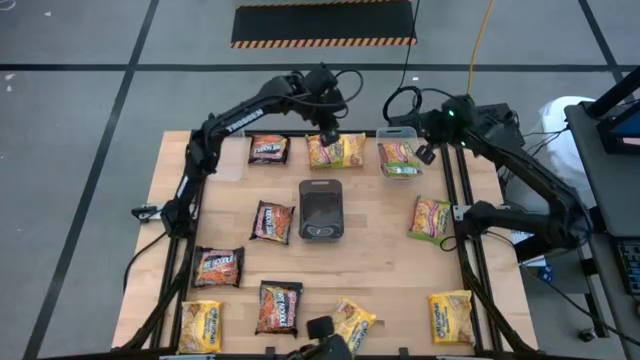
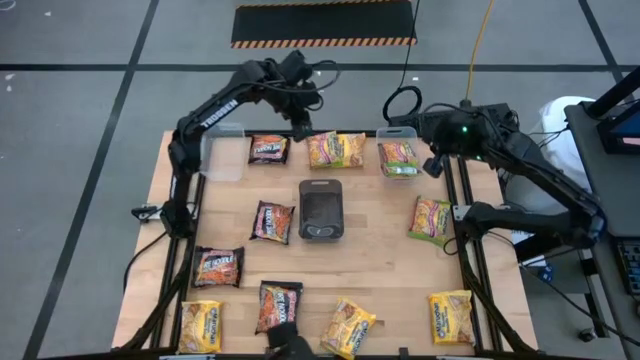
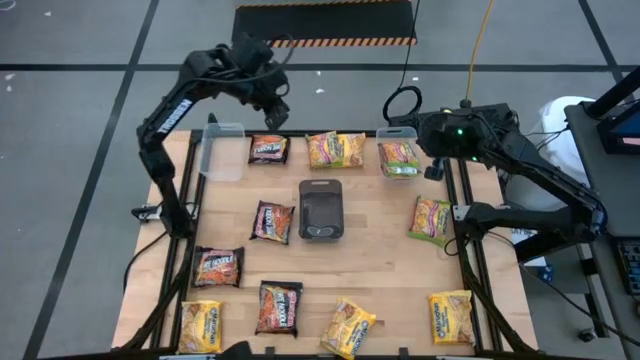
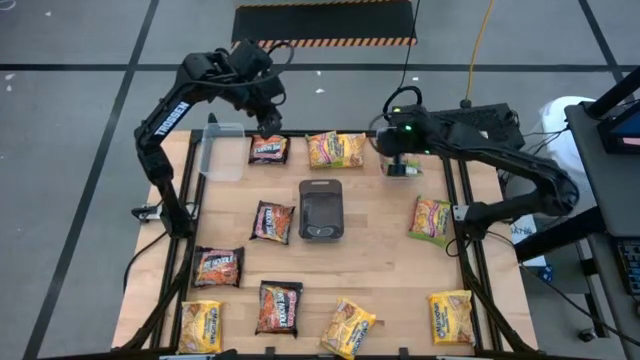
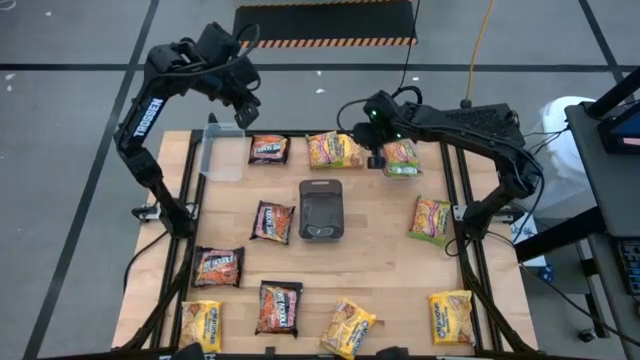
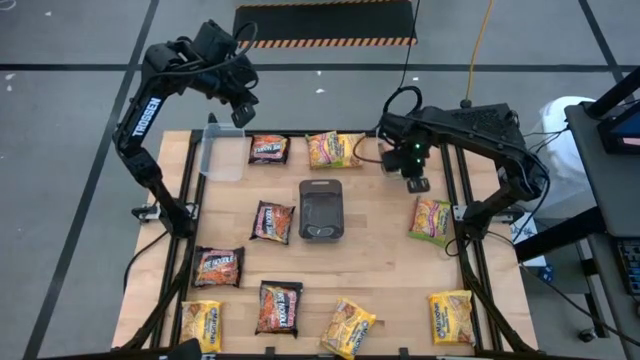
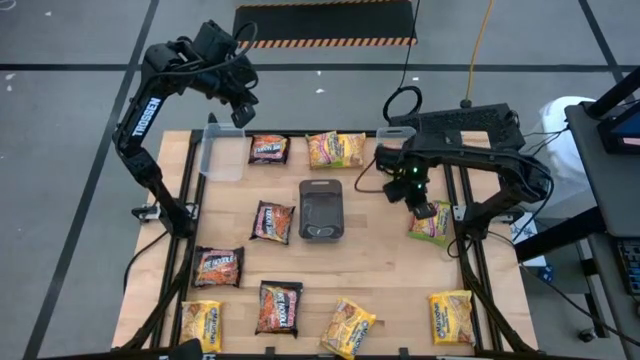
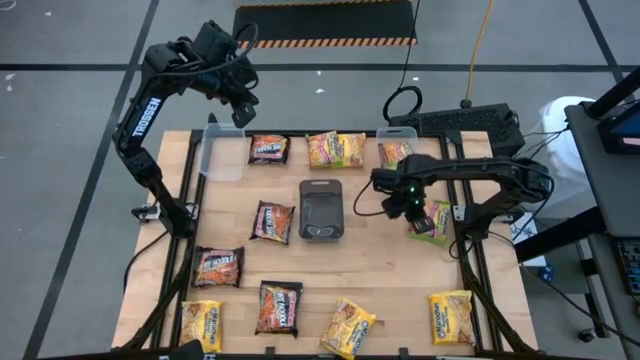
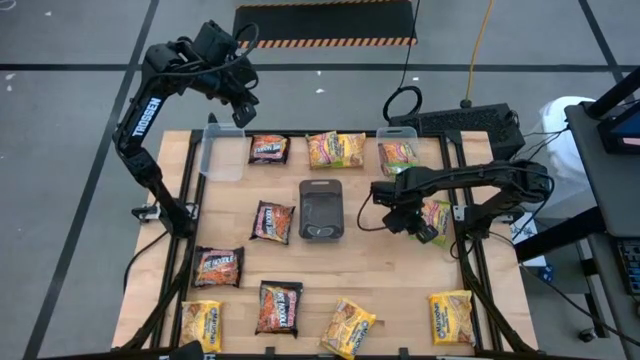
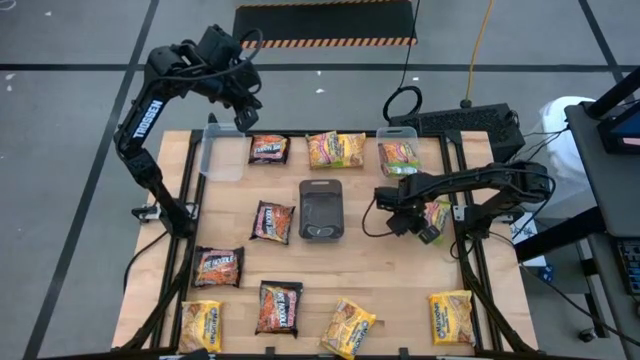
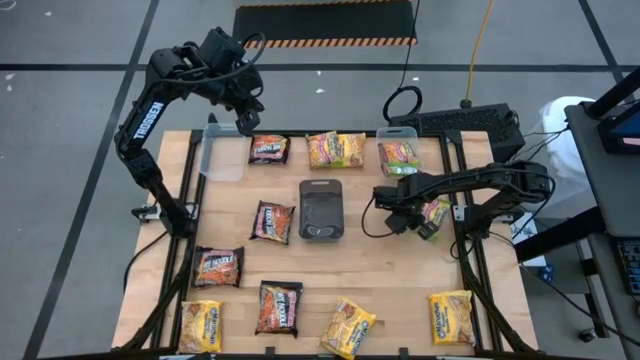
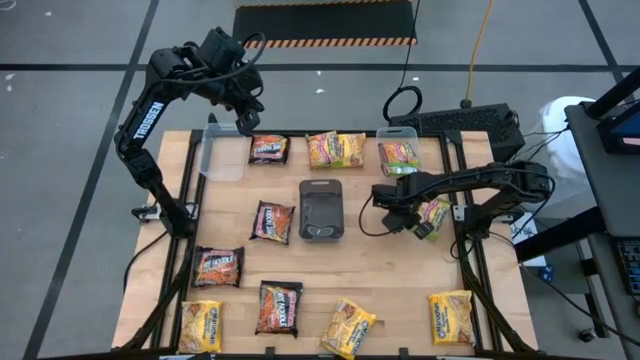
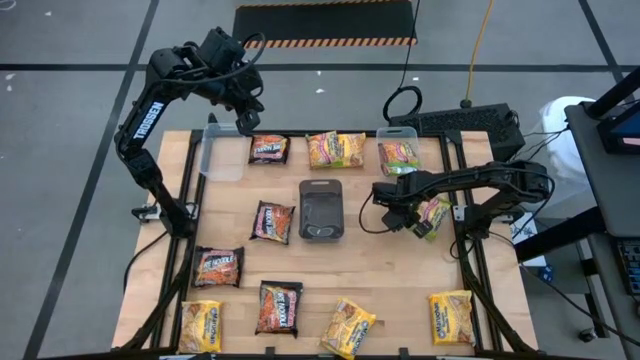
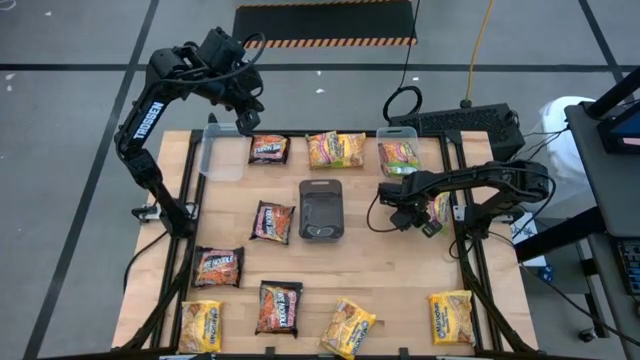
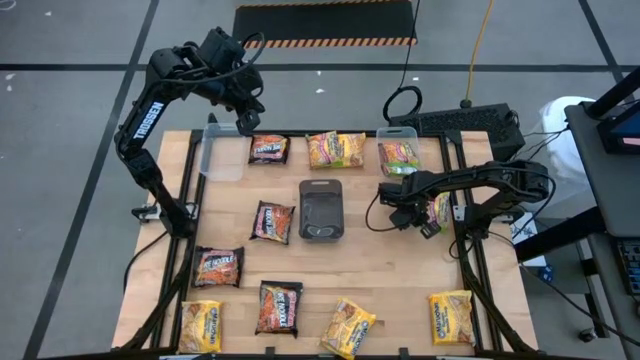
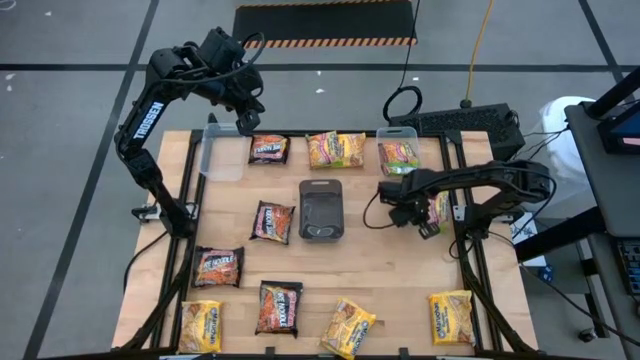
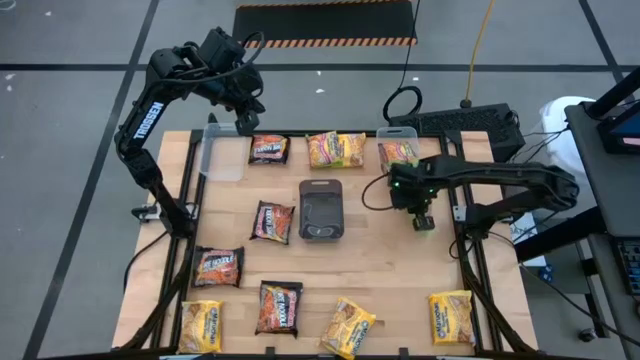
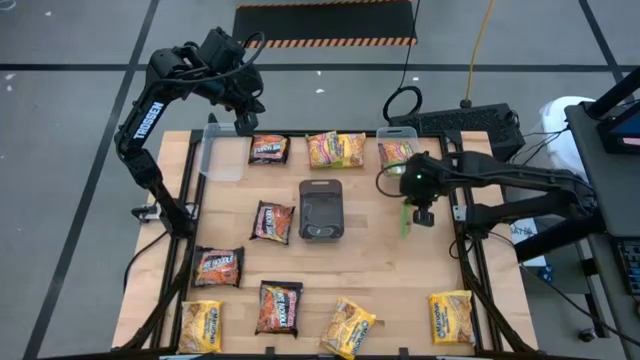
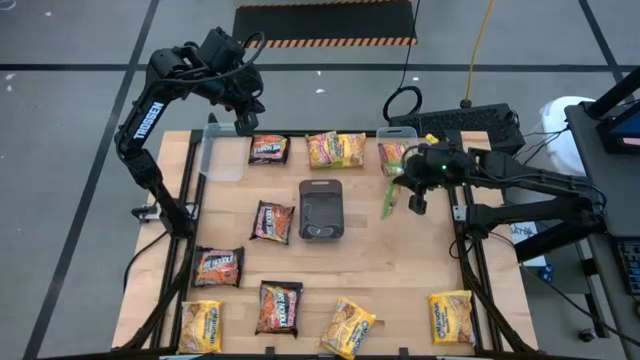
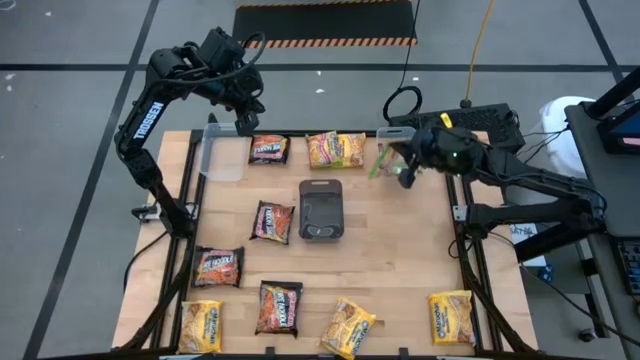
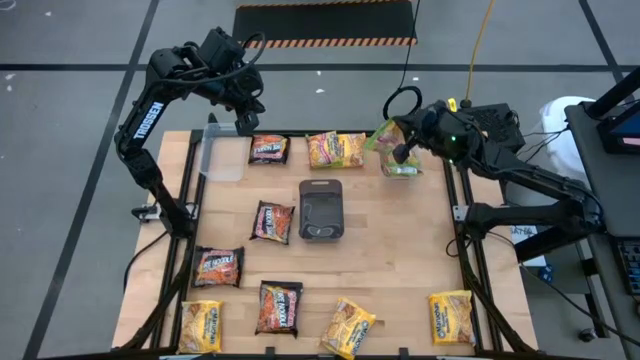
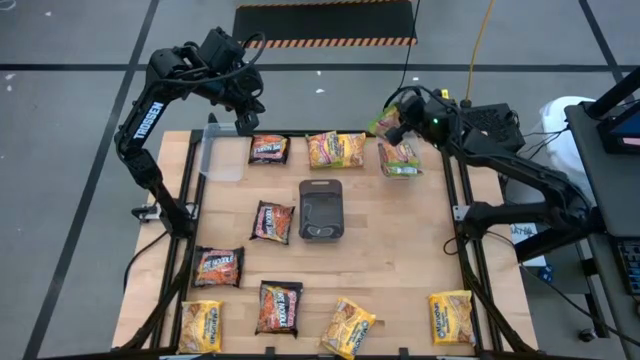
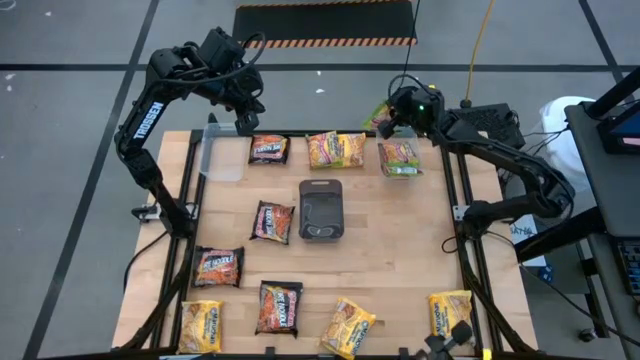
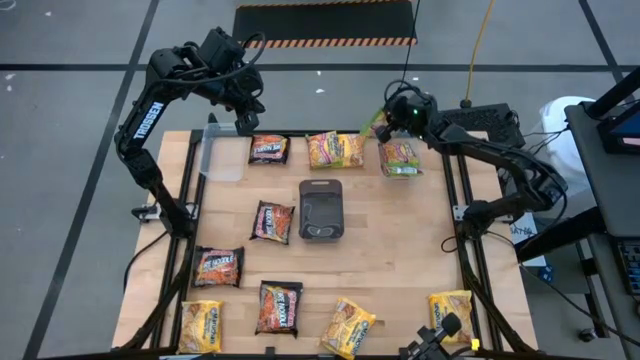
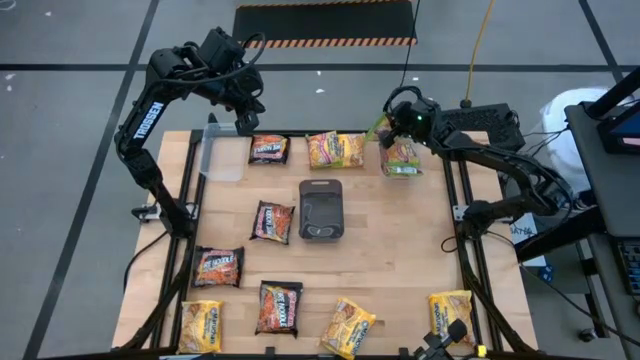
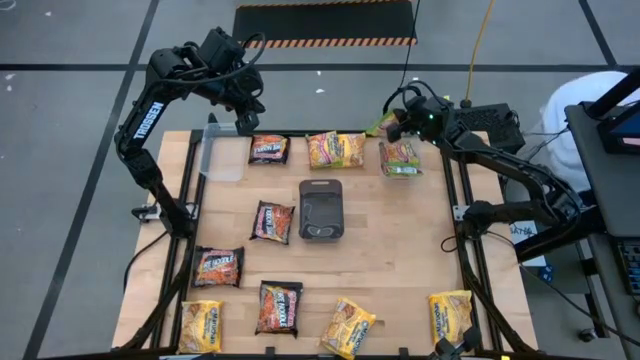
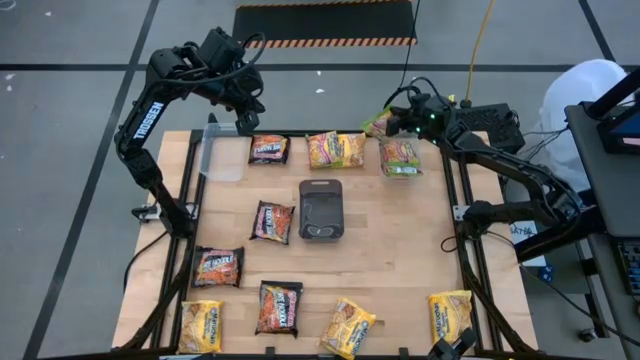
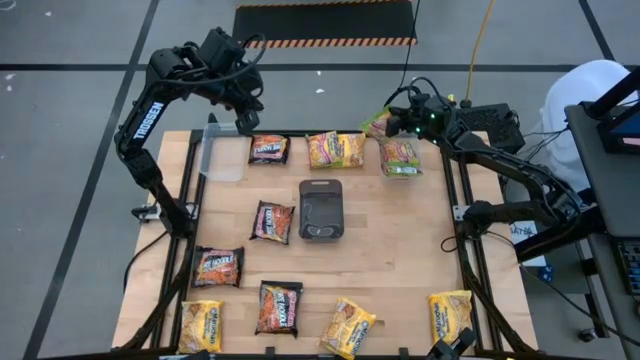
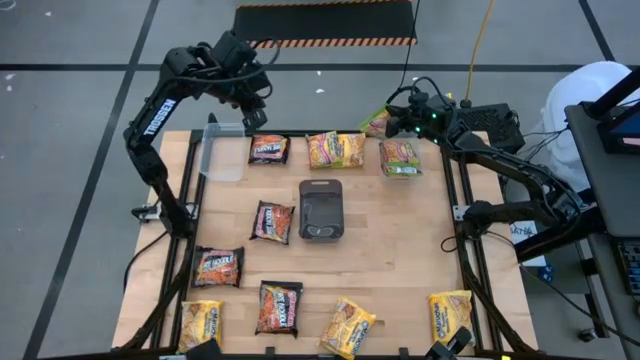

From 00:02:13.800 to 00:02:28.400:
Task: Sort Maruchan noodles
Put the right green noodle pack into the right transparent bin

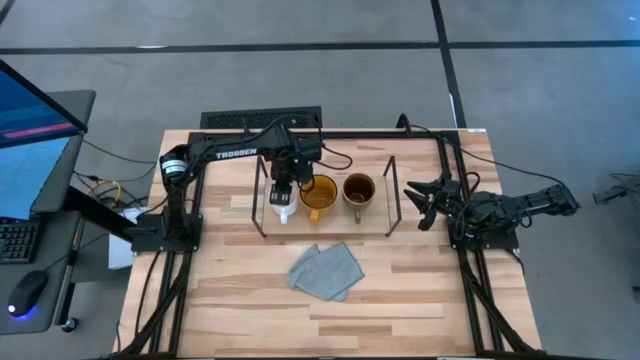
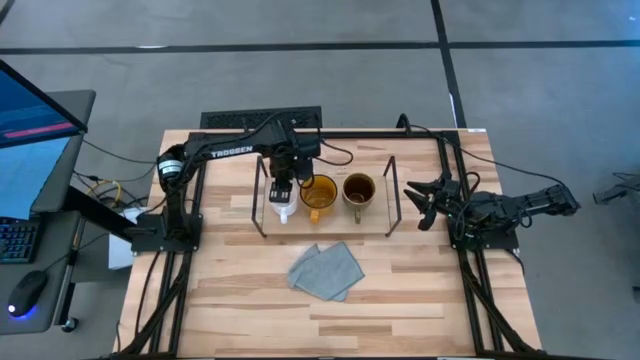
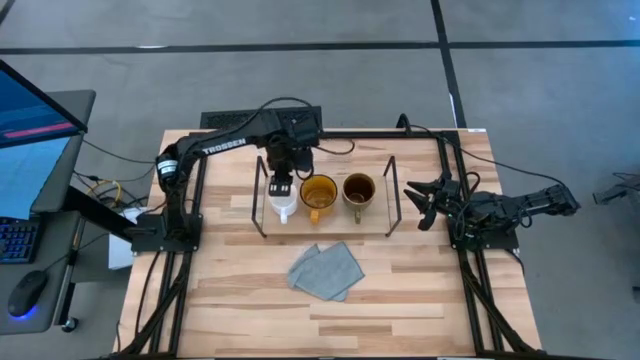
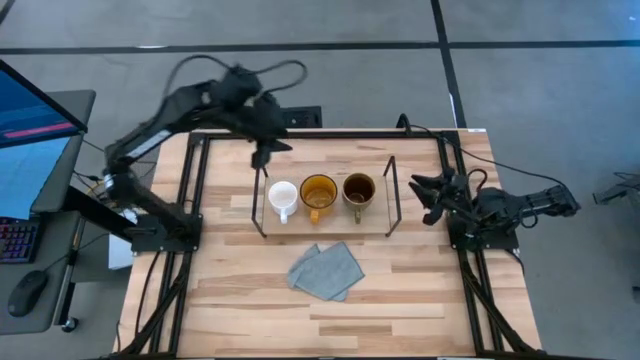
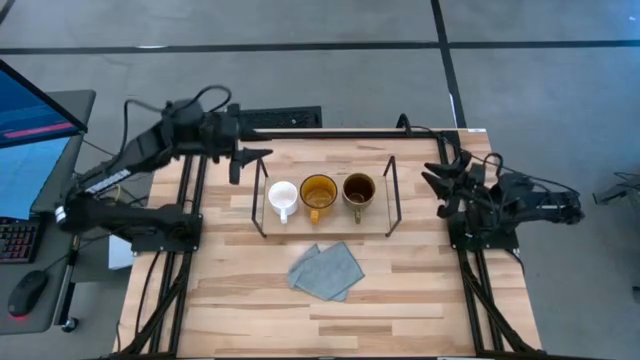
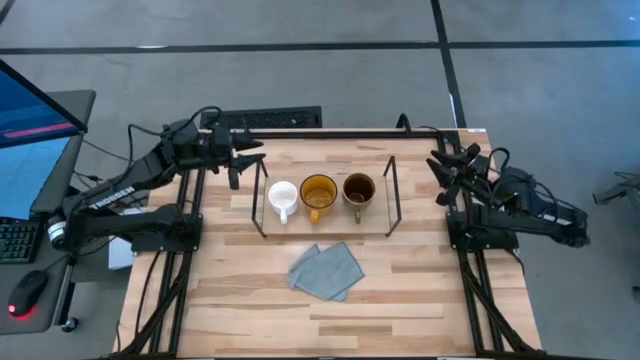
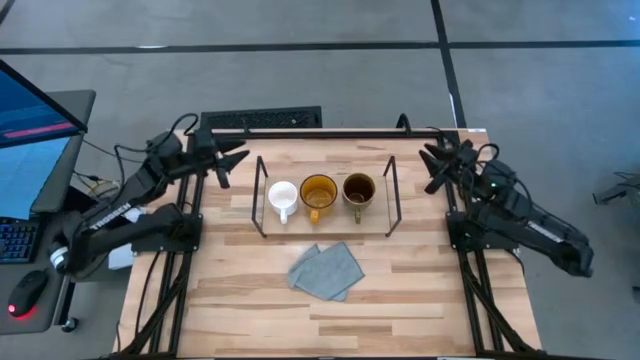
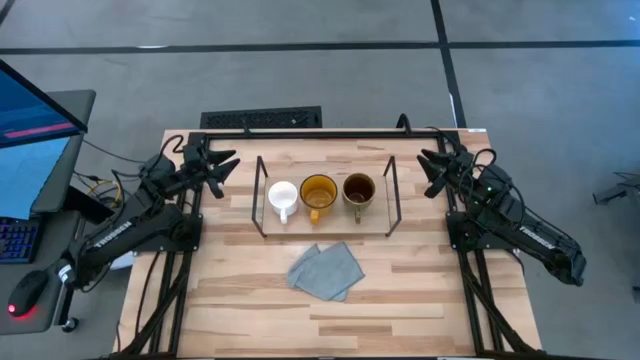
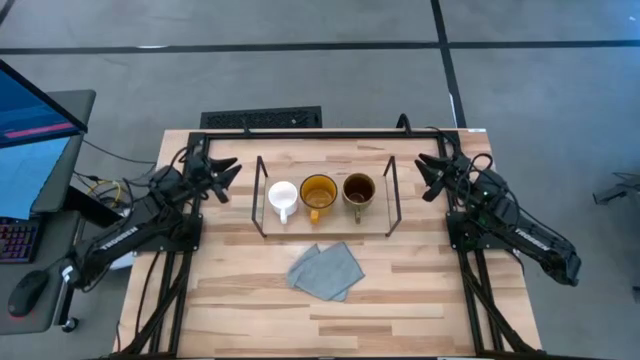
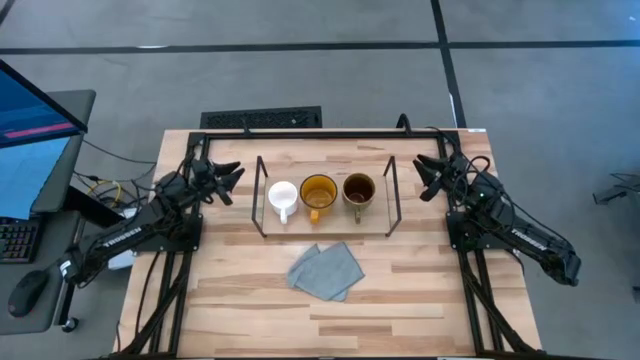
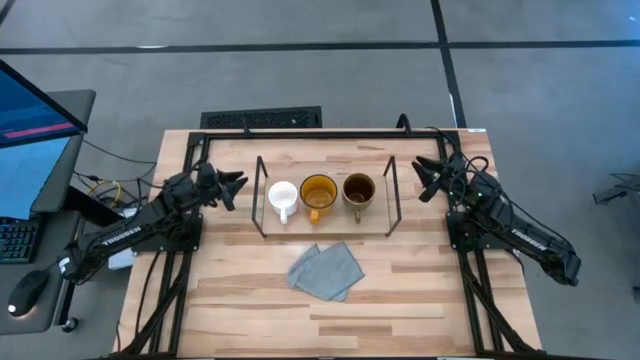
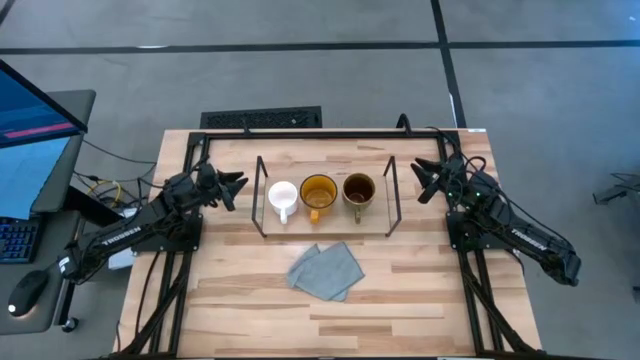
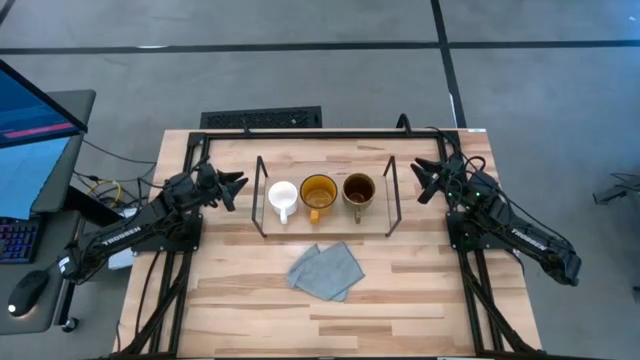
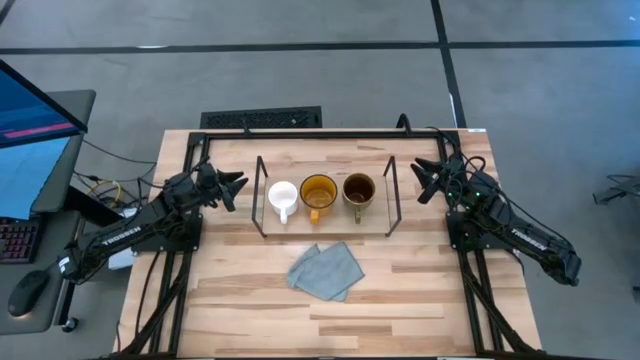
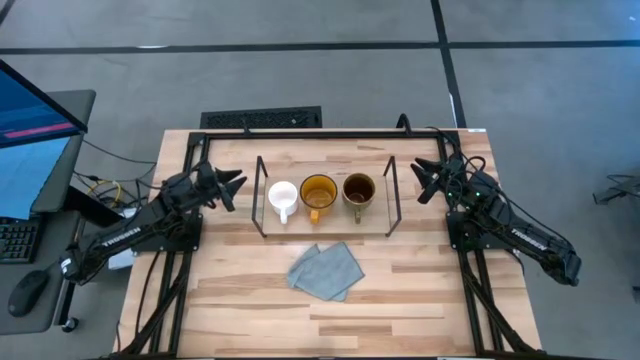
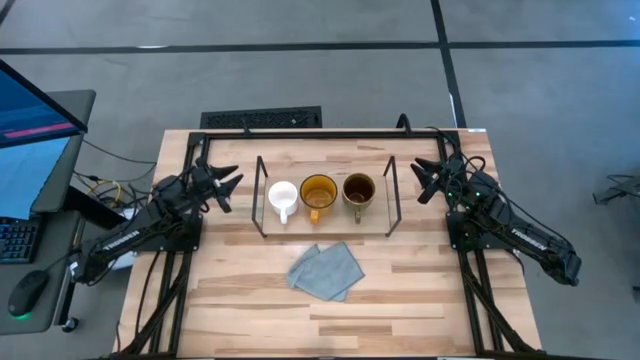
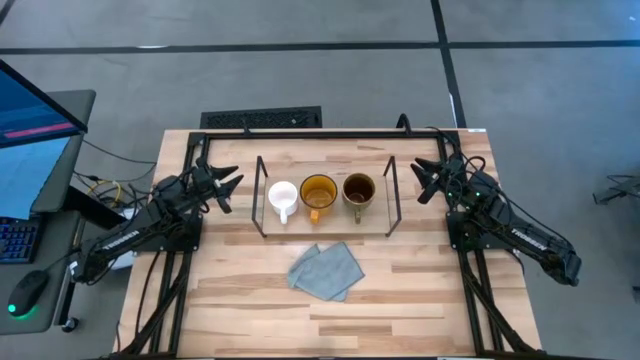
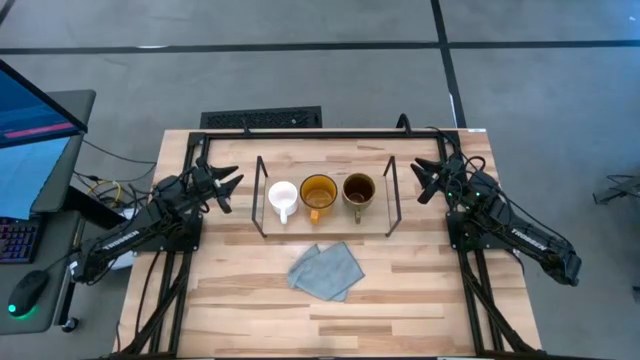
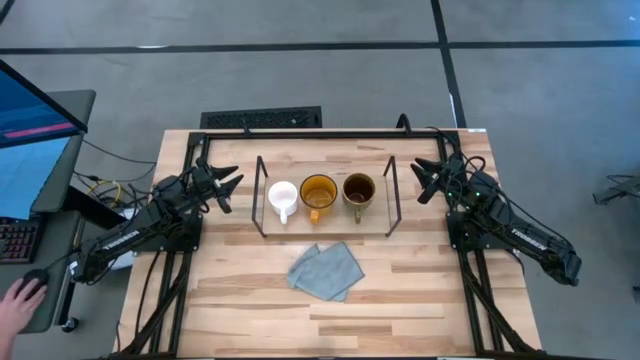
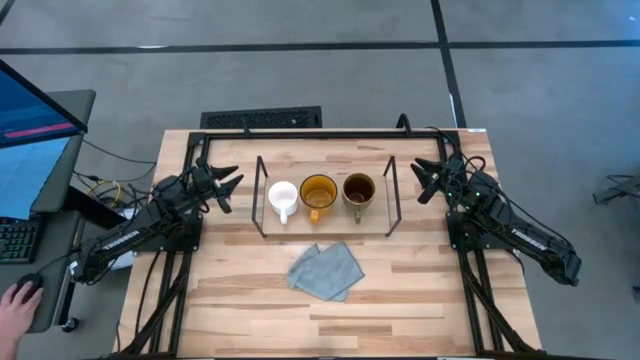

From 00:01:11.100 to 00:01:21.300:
Task: Stack small to large cups/mugs on shelf
Return to Home Position
